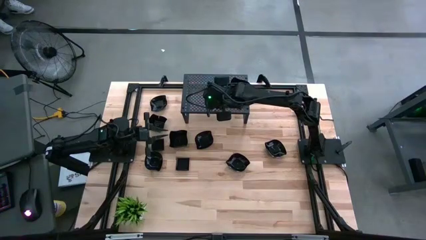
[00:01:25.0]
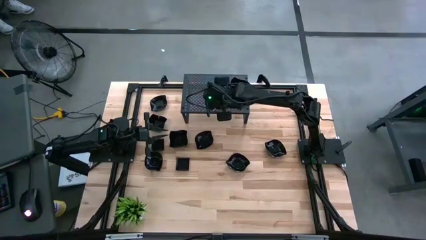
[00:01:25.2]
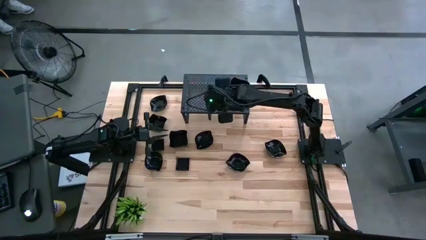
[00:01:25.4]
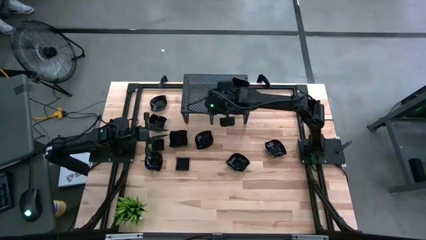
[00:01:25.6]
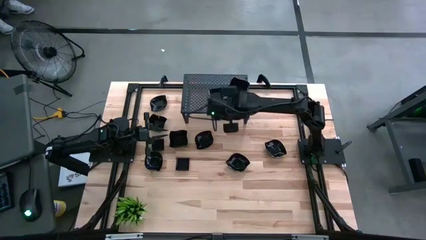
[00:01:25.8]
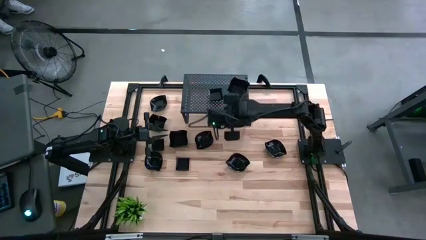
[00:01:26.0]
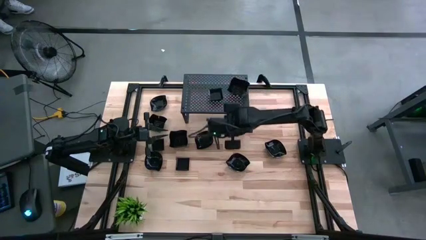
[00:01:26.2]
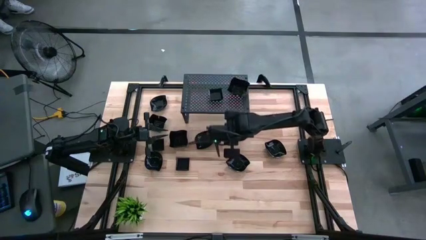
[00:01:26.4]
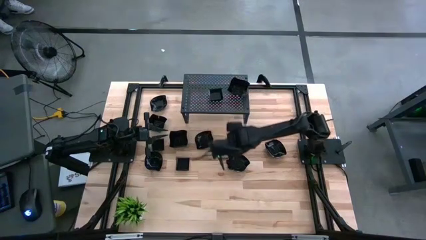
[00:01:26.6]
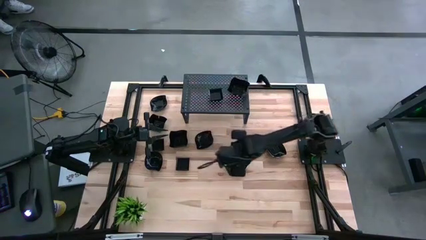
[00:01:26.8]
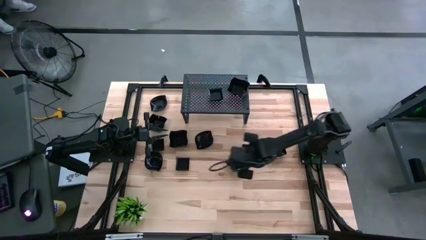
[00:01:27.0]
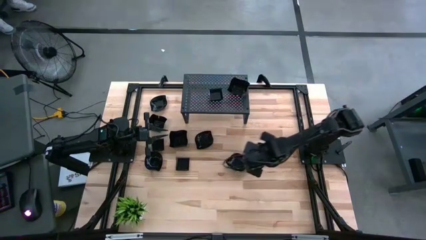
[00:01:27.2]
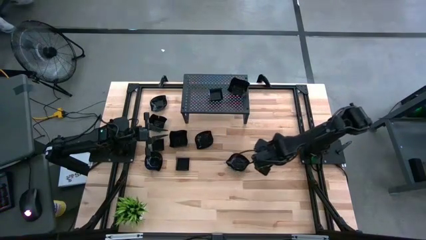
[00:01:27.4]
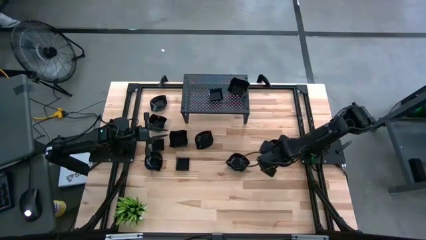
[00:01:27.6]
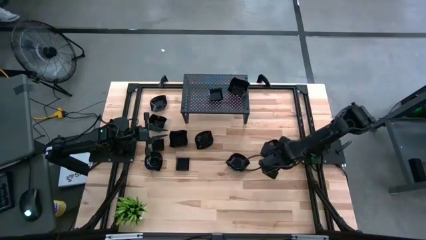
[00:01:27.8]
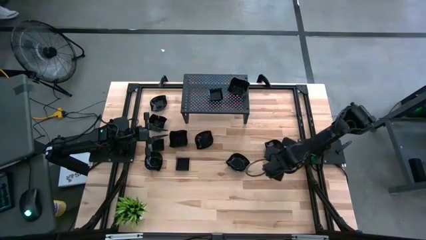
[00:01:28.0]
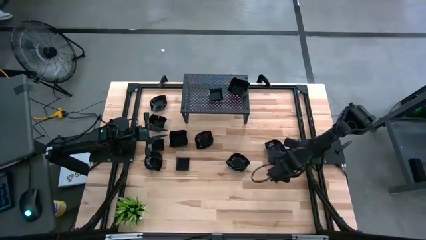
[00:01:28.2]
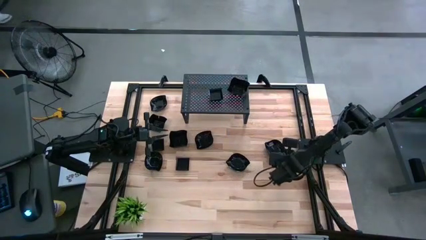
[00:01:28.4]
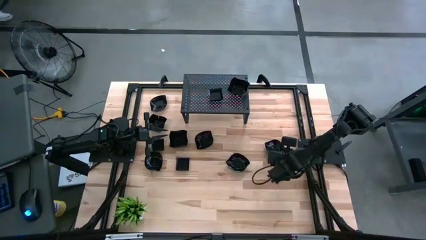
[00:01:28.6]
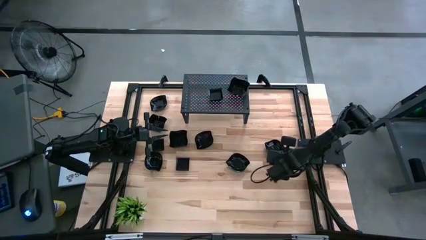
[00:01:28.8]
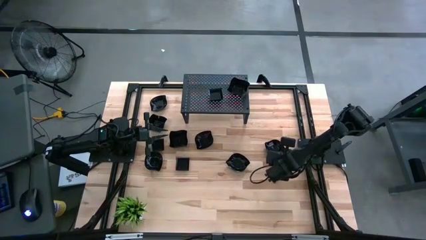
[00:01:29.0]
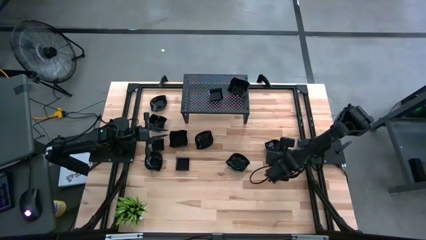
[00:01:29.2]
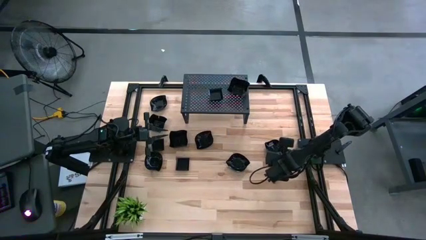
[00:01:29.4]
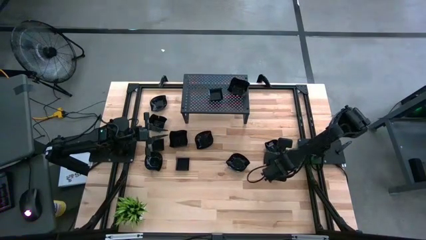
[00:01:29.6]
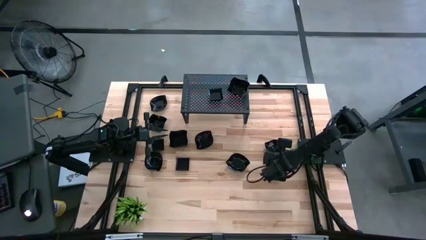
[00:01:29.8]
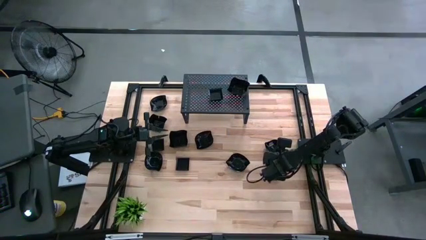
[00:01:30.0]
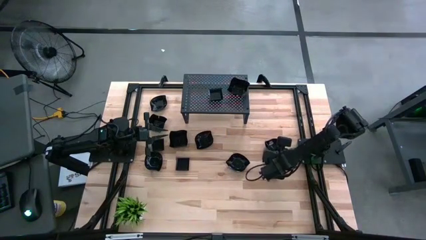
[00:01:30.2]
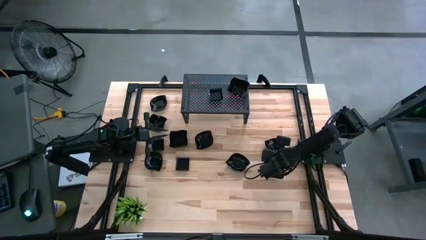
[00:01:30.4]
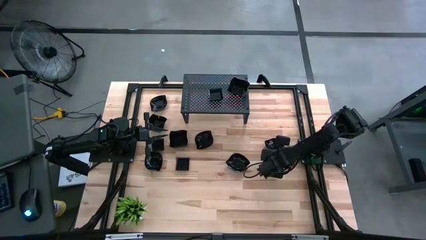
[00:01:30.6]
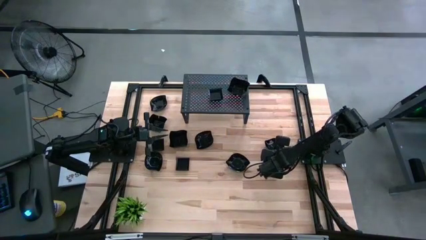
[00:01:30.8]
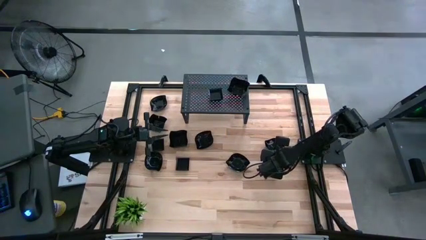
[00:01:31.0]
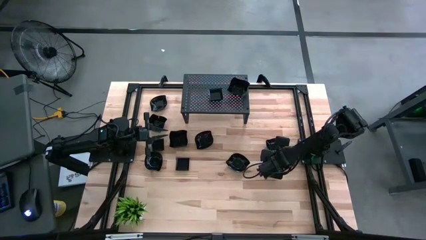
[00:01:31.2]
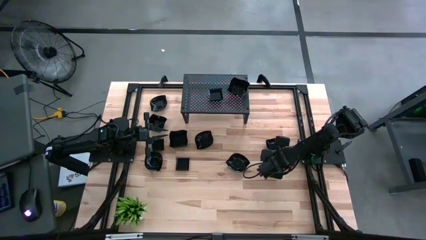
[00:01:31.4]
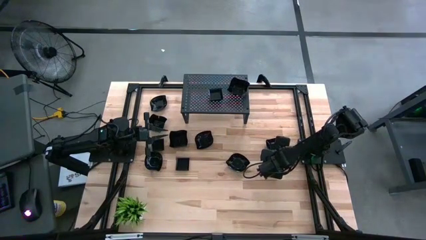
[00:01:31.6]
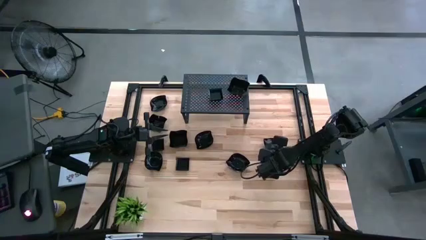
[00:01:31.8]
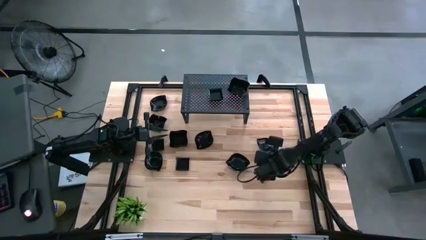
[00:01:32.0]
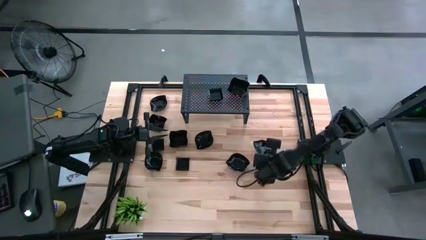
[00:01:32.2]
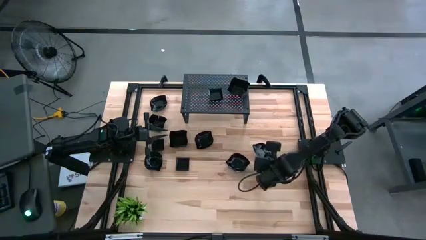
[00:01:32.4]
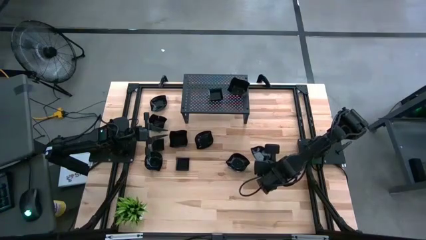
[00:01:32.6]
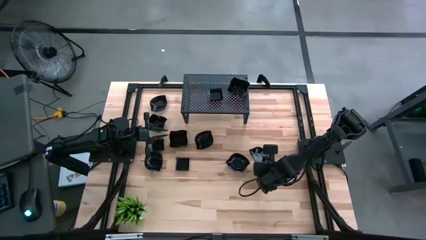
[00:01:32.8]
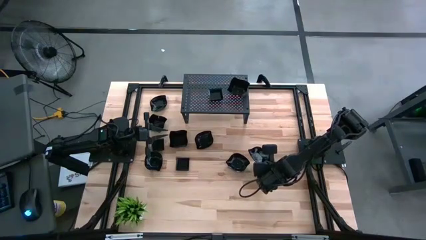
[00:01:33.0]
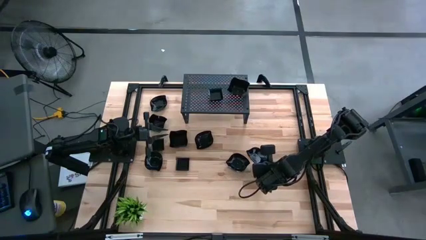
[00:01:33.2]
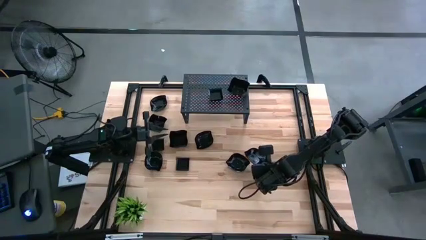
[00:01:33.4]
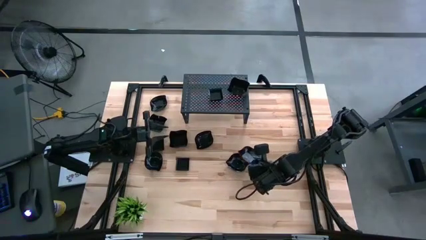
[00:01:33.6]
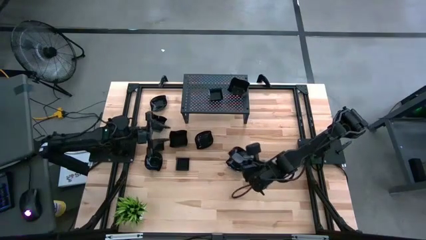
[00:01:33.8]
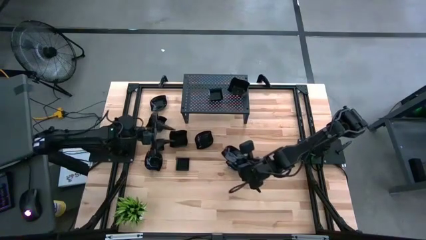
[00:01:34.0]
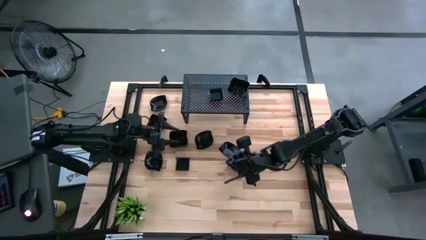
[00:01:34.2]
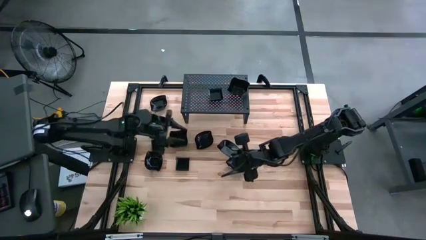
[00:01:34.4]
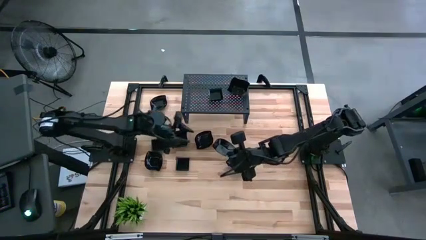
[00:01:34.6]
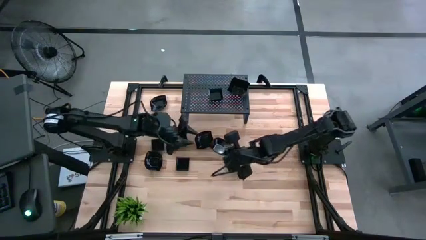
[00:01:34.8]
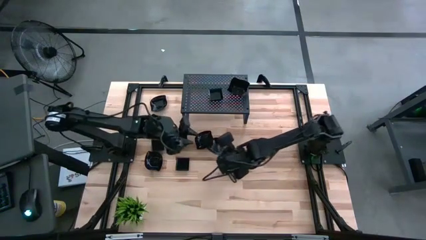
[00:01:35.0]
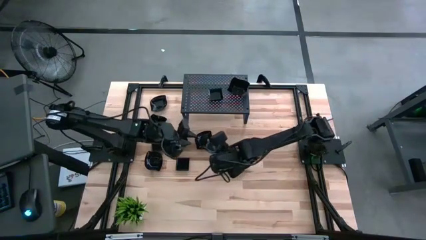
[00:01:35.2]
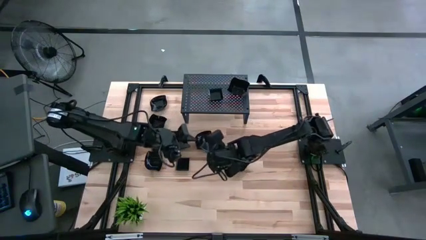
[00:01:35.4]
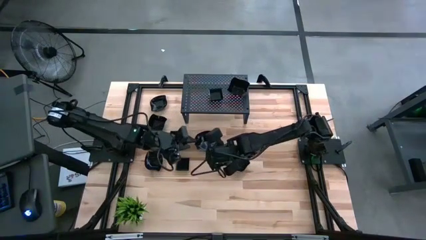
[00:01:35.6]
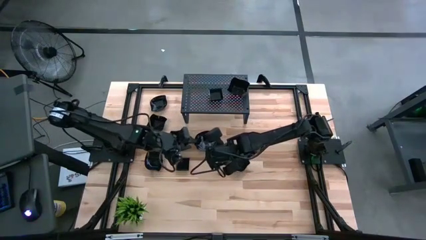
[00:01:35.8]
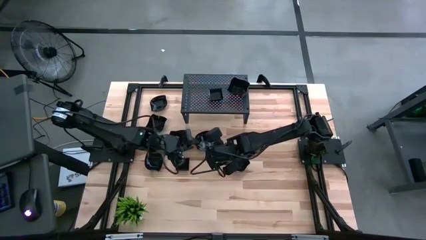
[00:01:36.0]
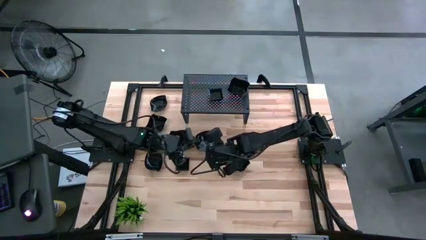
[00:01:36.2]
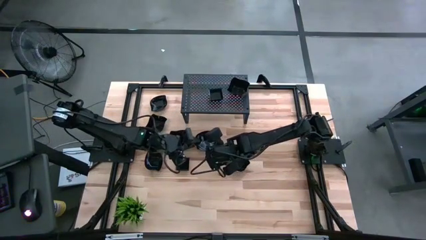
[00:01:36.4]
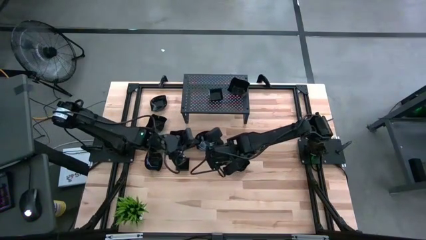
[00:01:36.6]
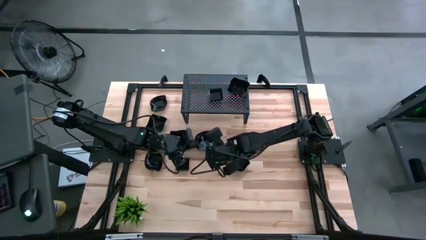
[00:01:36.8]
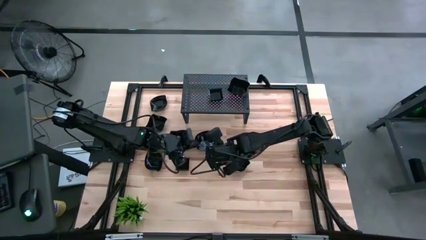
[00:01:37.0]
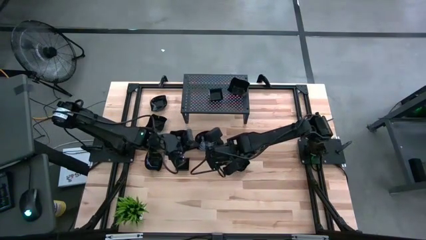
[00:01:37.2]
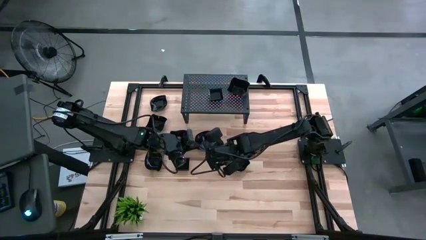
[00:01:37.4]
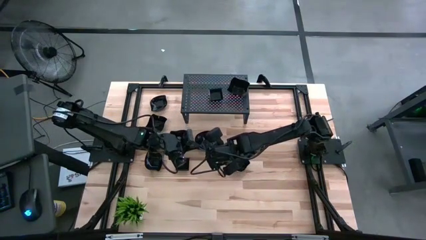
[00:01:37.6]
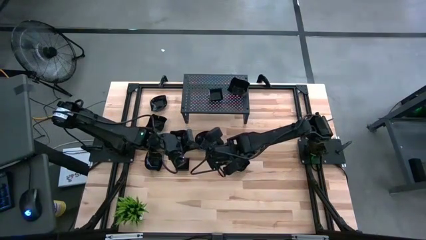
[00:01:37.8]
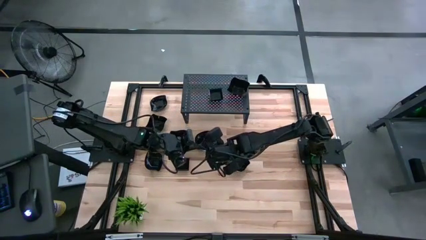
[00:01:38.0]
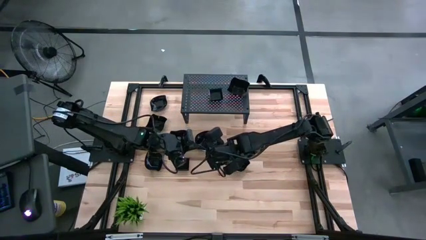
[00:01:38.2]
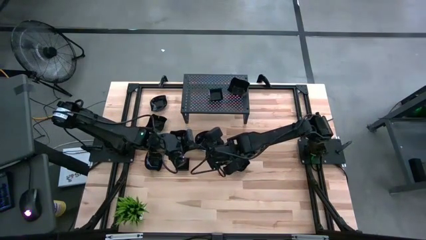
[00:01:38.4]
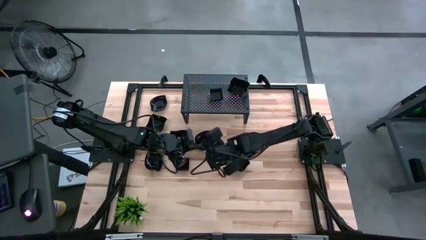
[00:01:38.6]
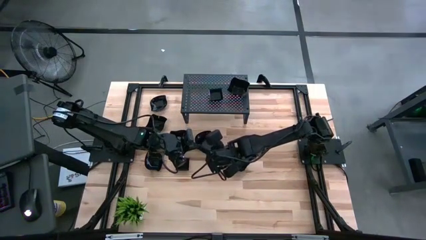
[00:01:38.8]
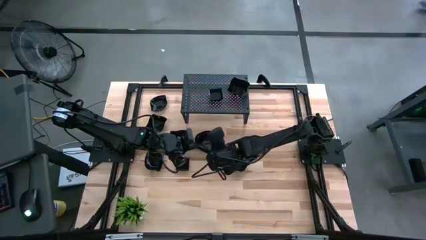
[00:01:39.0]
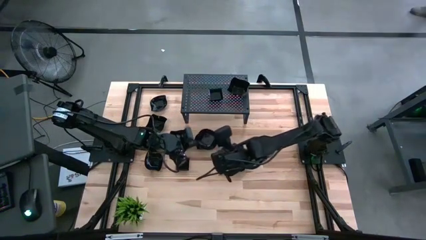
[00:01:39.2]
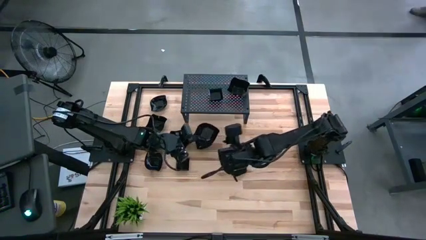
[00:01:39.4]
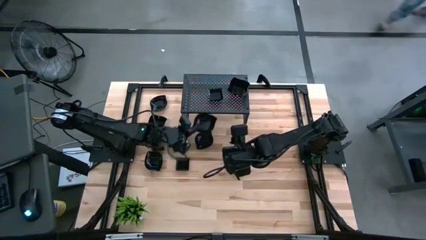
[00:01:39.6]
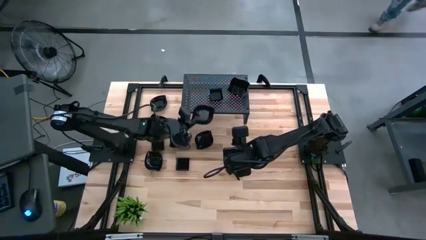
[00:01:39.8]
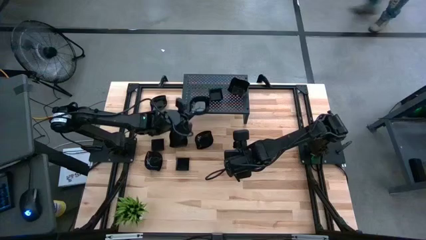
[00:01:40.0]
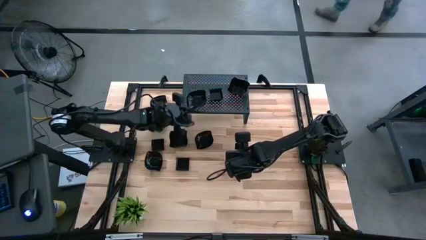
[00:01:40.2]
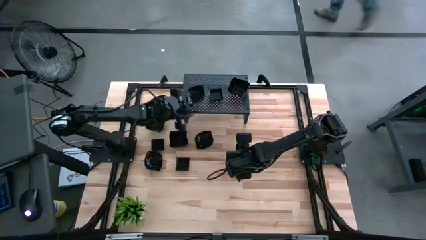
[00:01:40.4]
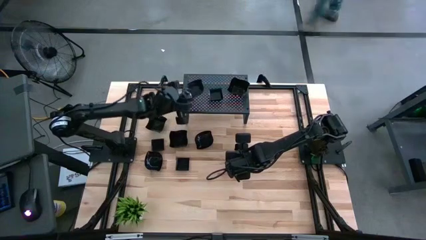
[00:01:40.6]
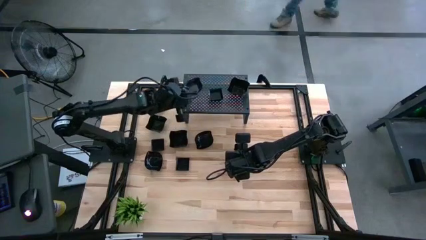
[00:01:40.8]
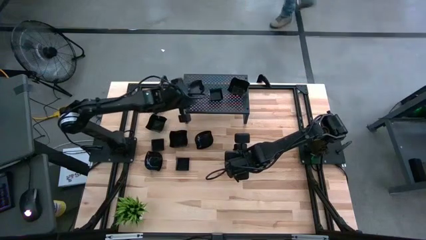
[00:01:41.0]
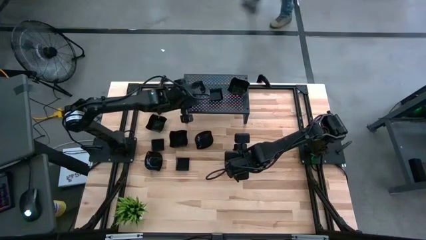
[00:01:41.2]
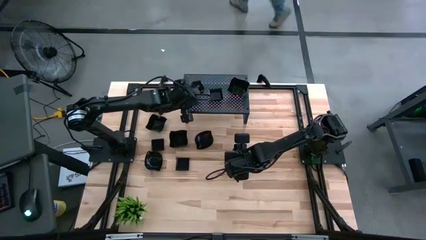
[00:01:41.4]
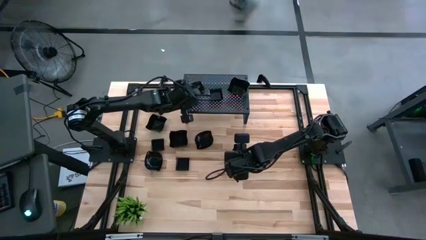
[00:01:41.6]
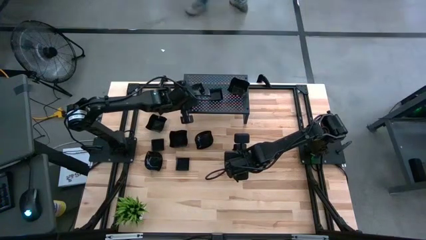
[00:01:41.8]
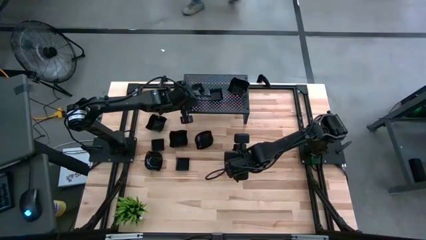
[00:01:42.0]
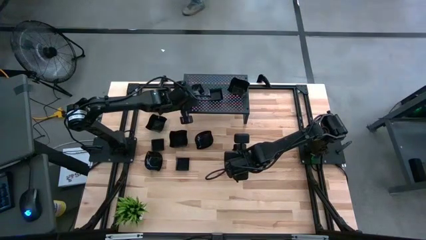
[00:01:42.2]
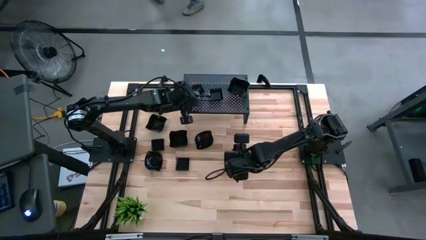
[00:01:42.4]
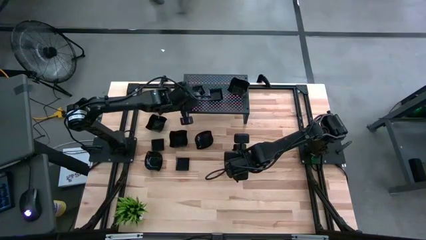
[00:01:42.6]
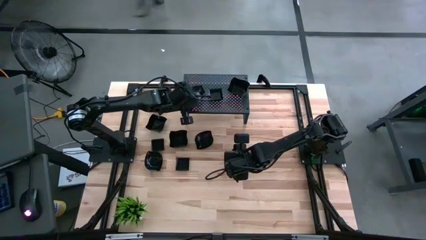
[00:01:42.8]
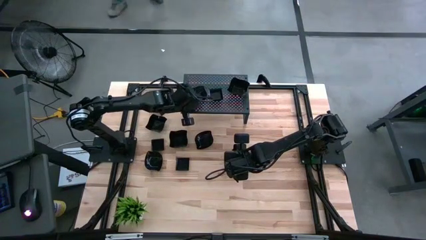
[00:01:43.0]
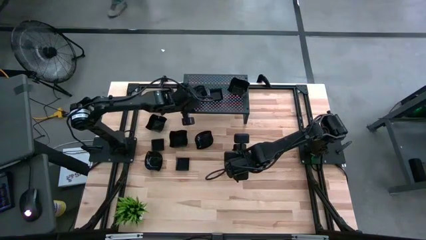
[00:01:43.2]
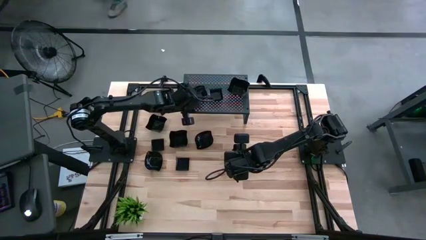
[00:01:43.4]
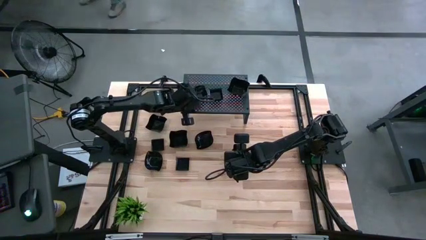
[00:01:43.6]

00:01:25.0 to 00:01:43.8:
Task: Pick & Place Mini shaped plates
Put the black leaf-shaped plate on the shelf
